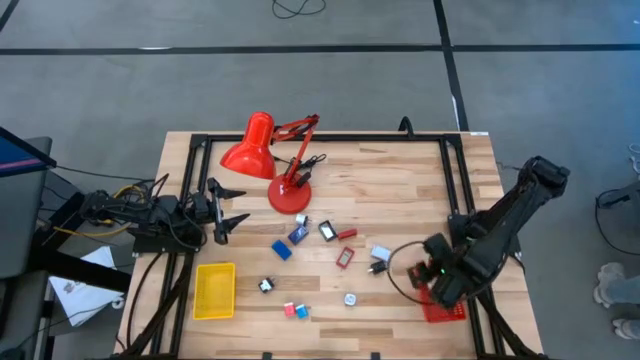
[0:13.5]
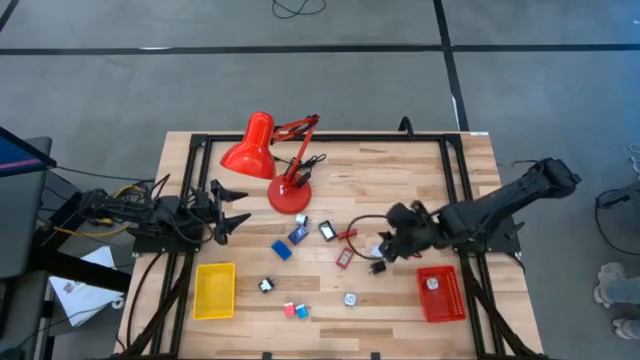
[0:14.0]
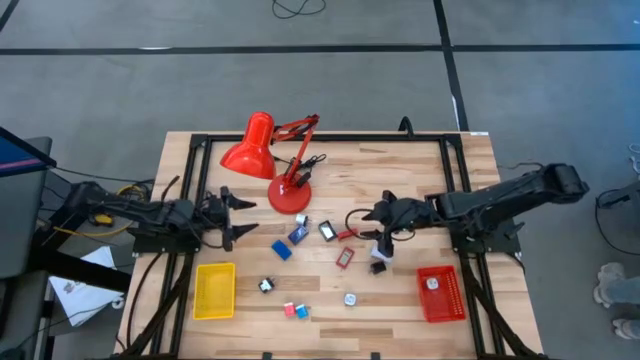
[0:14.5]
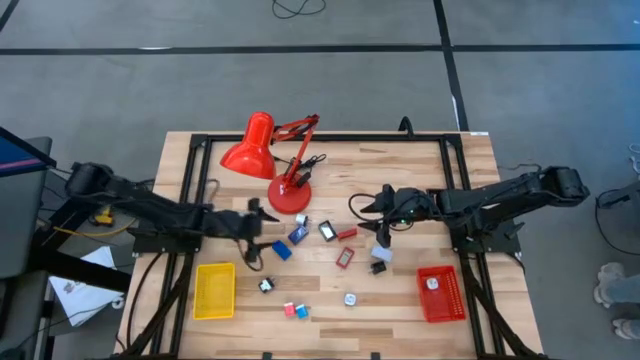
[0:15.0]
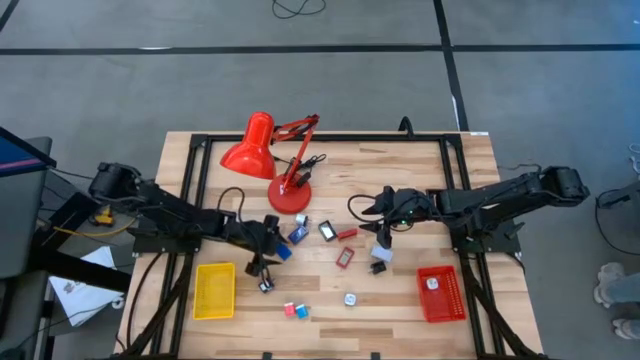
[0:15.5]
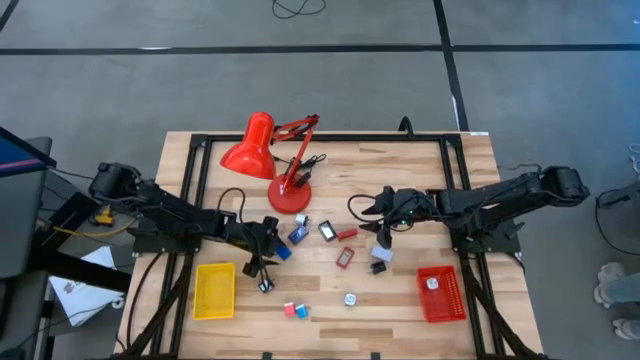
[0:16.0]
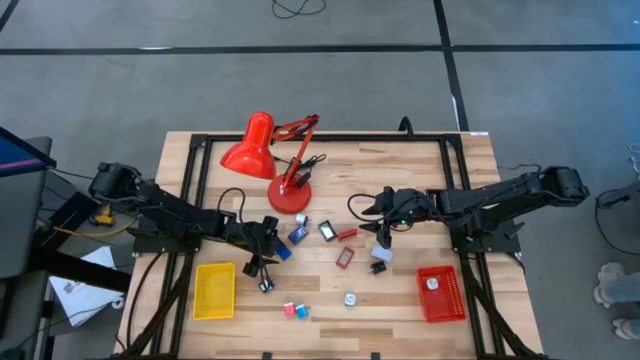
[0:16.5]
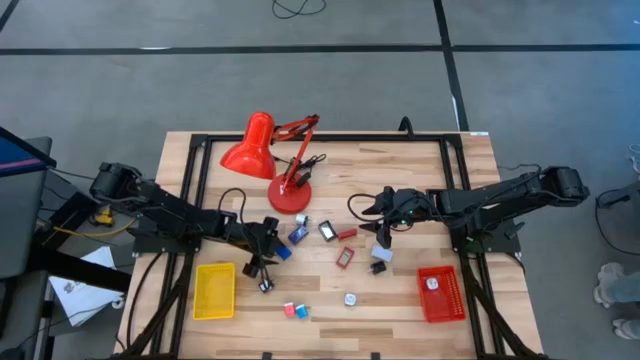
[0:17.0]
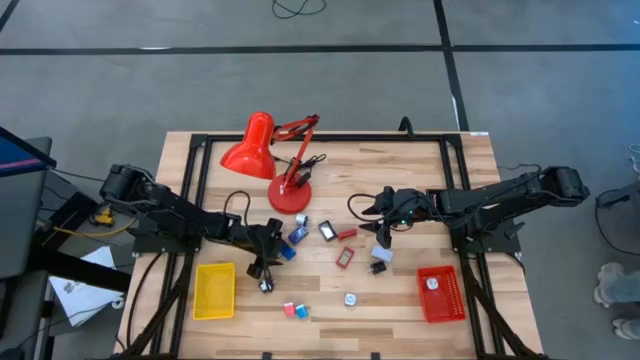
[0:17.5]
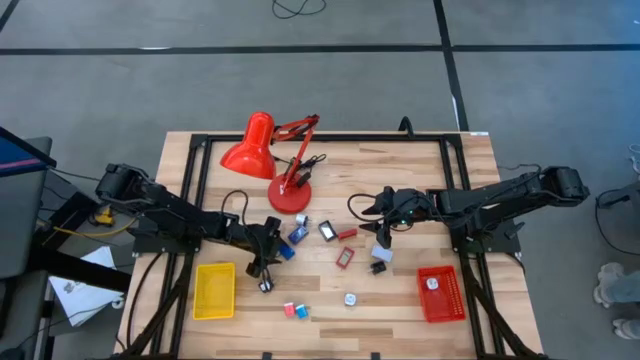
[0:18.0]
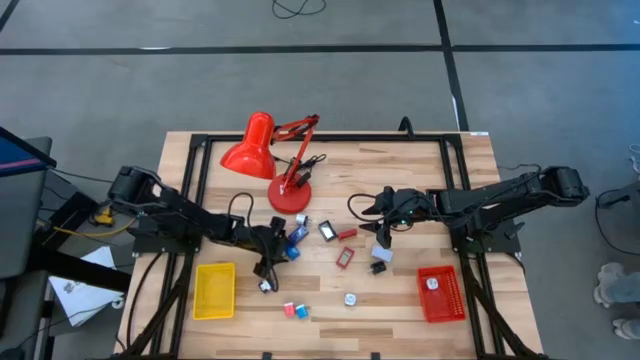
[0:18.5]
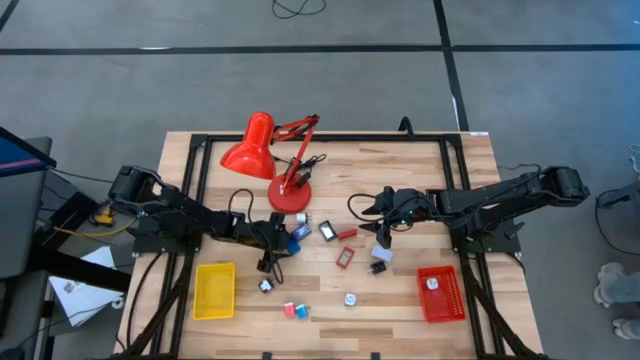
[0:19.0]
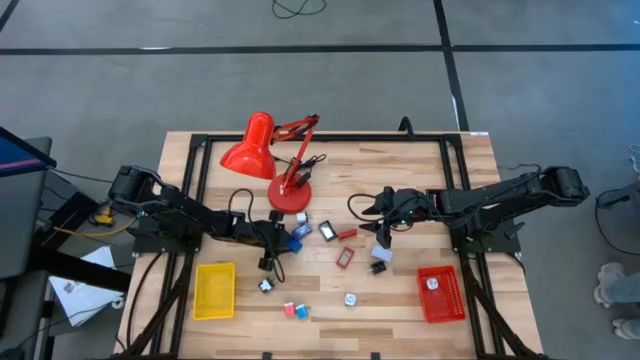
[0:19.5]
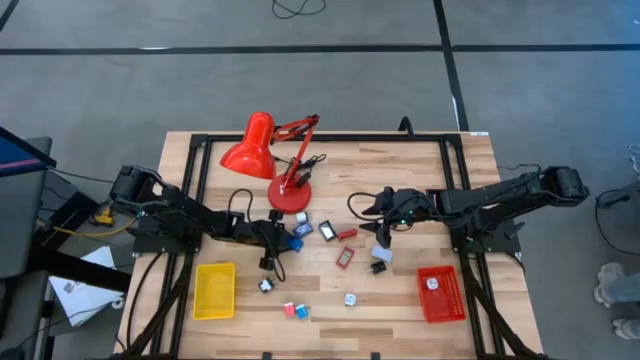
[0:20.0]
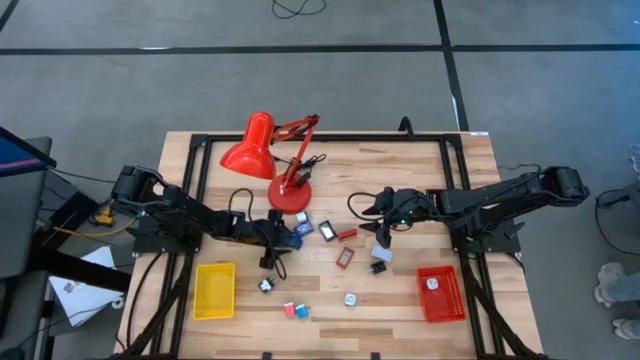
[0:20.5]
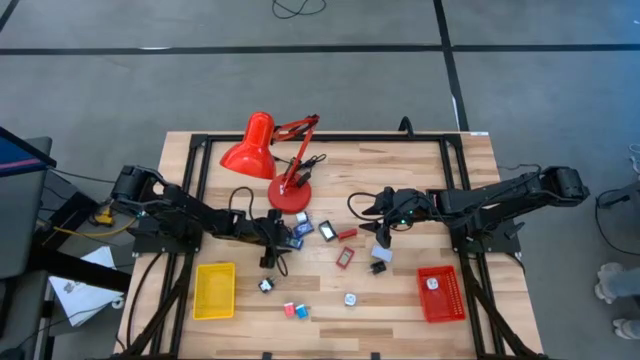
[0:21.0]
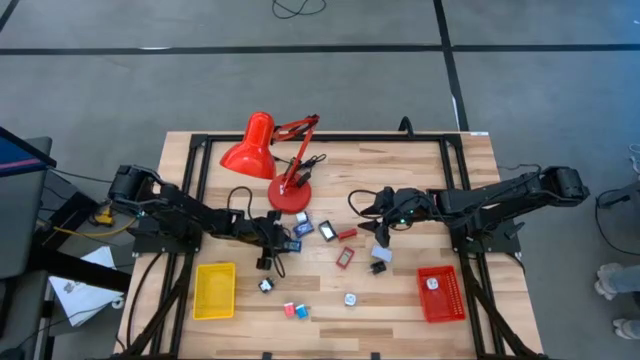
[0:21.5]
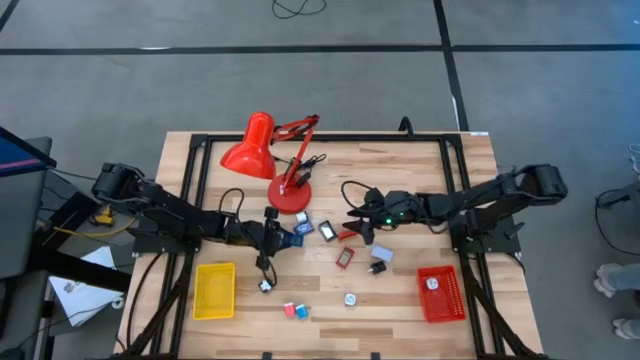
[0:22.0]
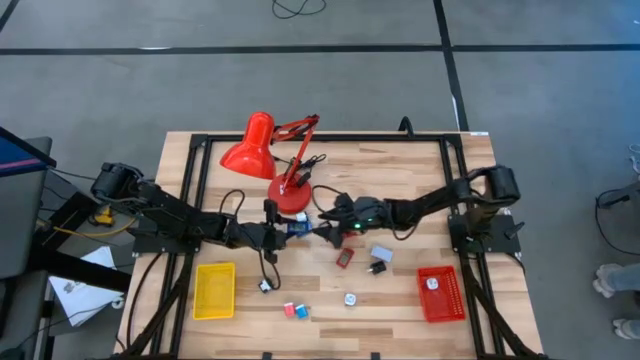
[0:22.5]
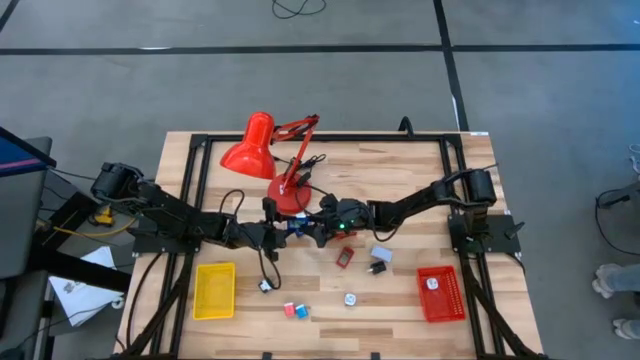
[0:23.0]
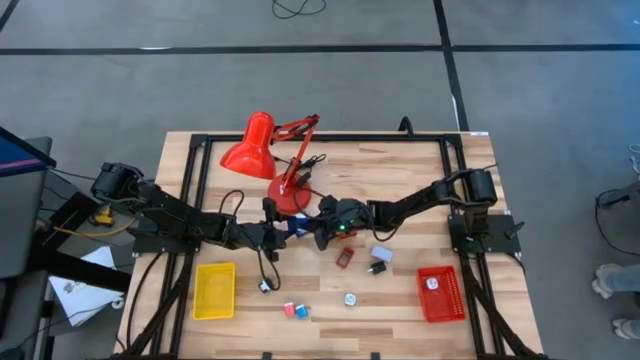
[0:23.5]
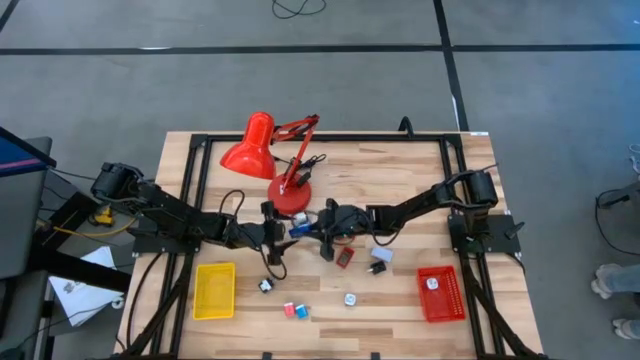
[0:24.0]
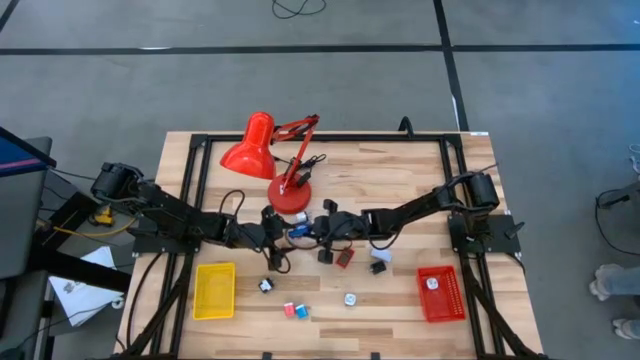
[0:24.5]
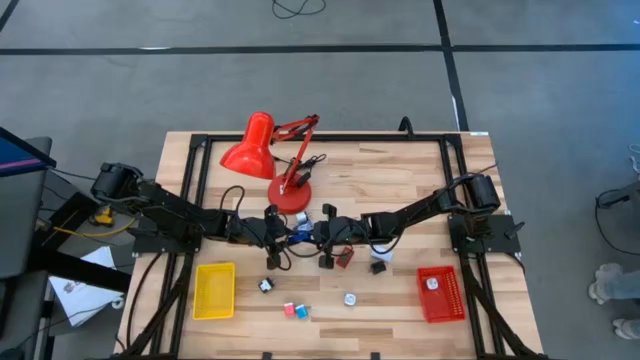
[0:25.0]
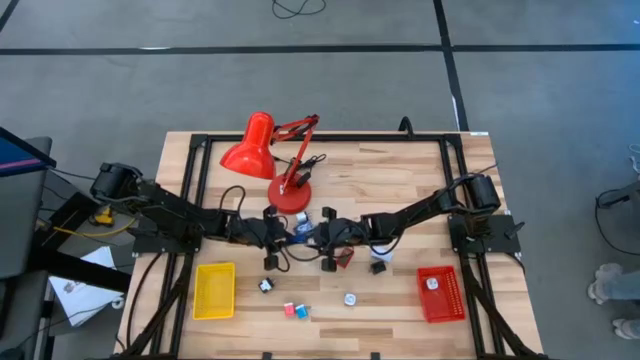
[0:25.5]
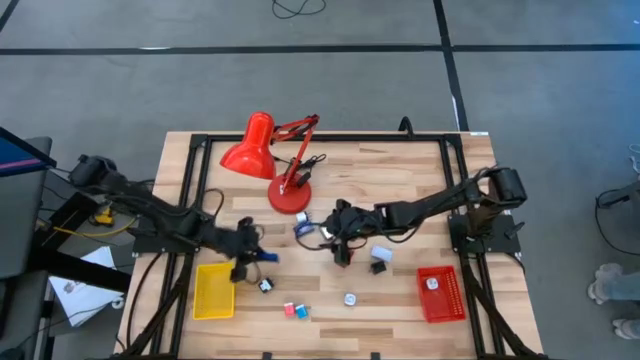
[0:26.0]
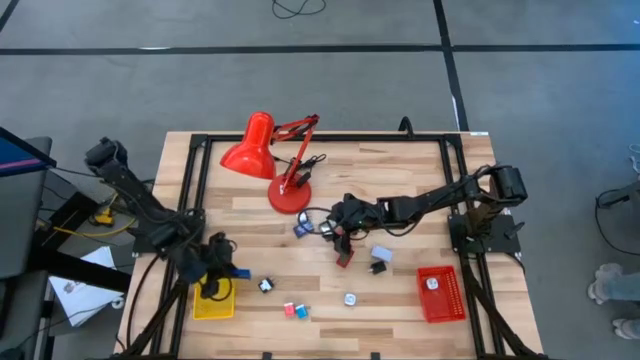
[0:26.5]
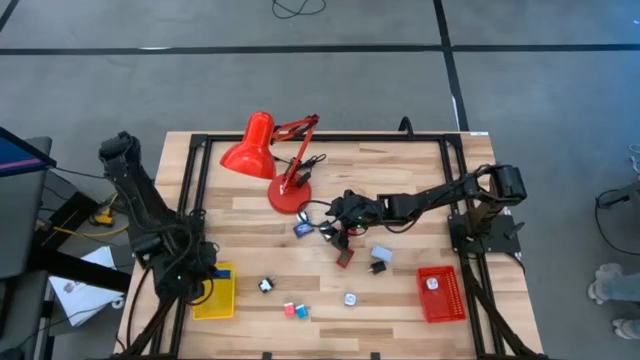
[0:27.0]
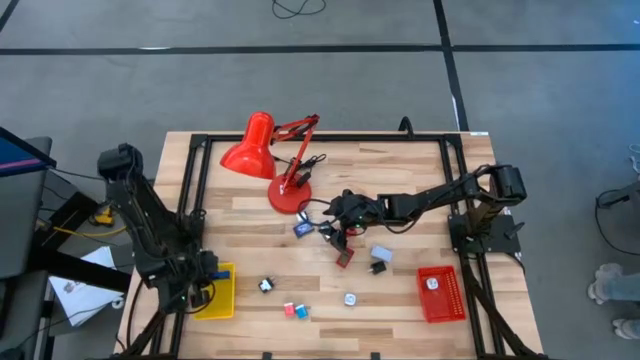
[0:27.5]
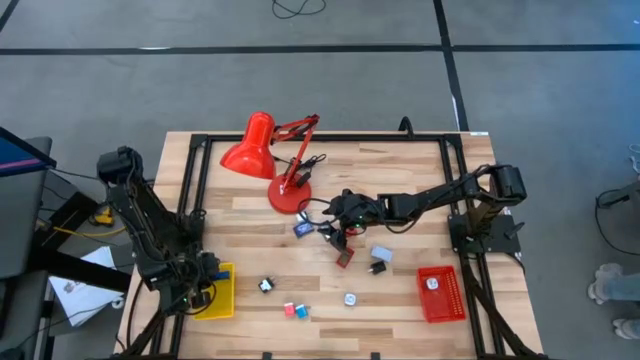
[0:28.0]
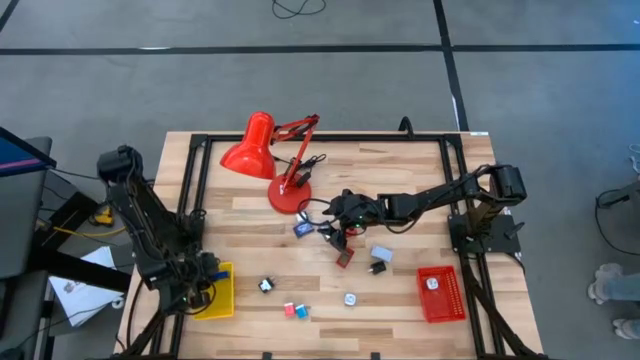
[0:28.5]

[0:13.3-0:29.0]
Task: Pick & Place Office items
Put the blue digital timer into the yellow bin
